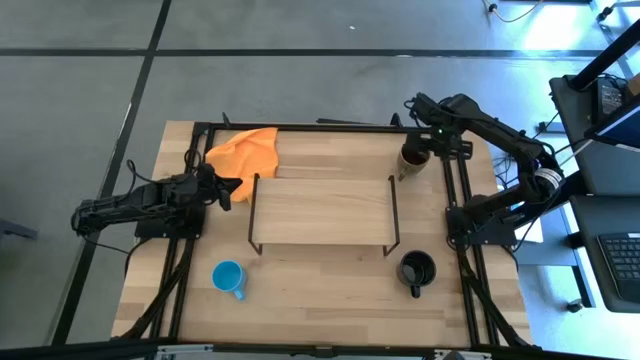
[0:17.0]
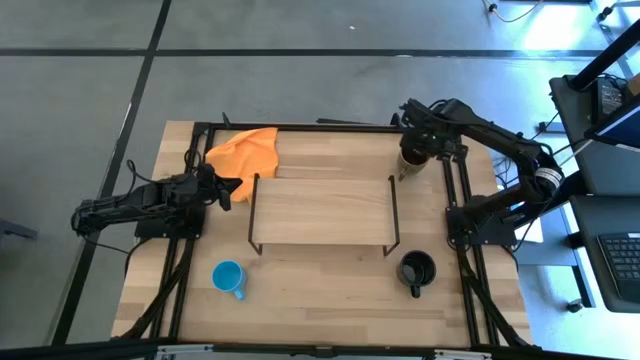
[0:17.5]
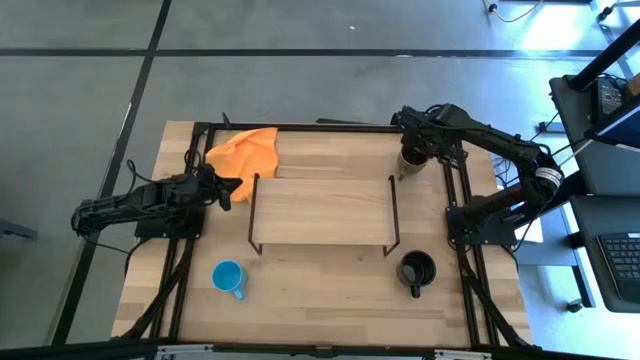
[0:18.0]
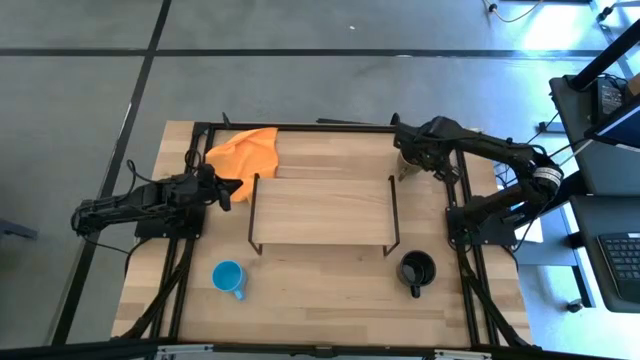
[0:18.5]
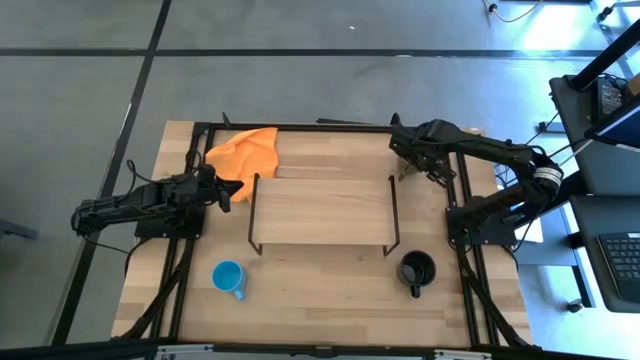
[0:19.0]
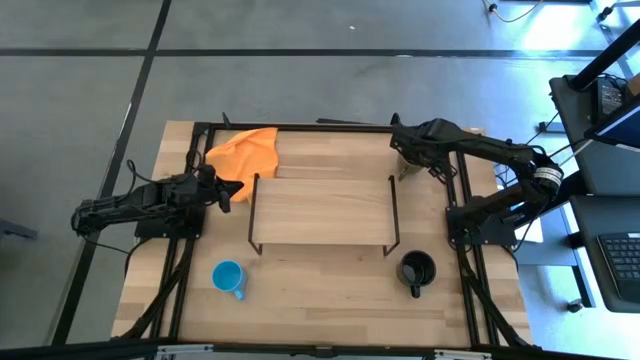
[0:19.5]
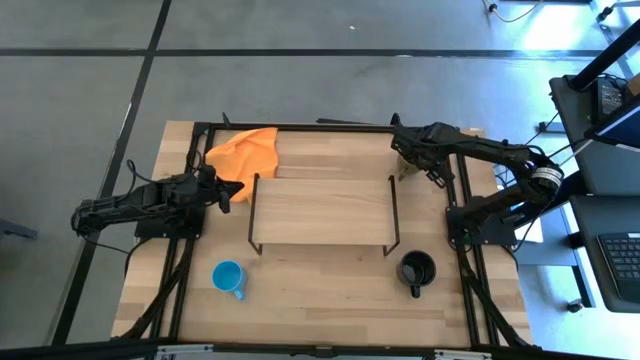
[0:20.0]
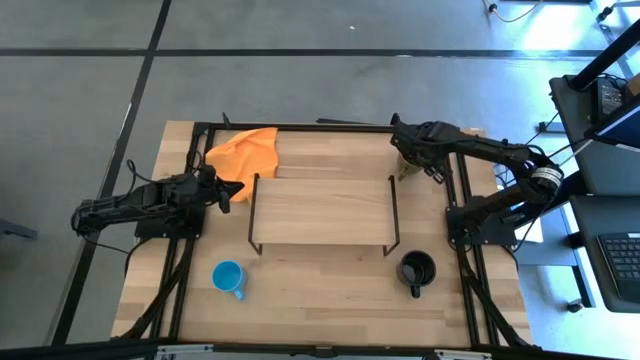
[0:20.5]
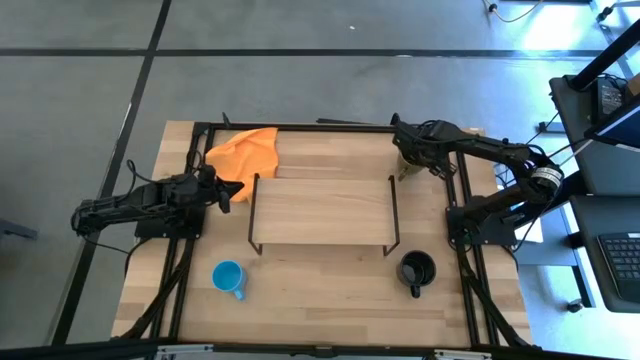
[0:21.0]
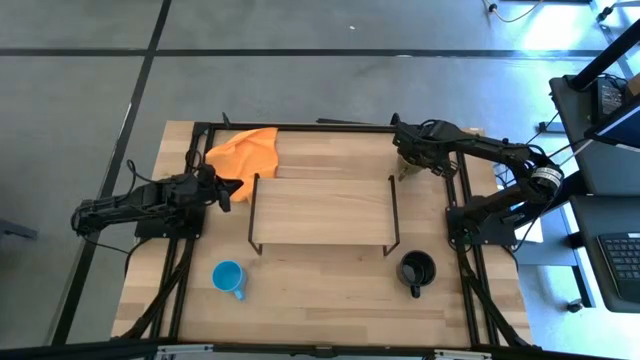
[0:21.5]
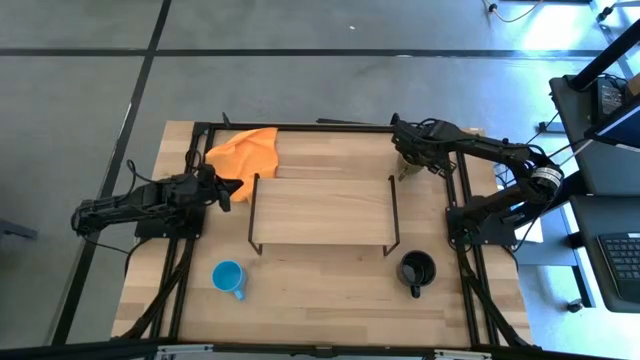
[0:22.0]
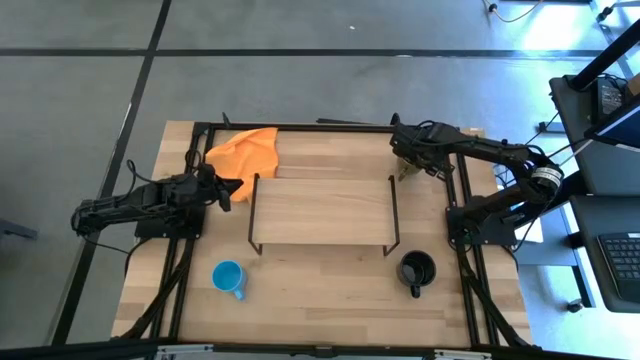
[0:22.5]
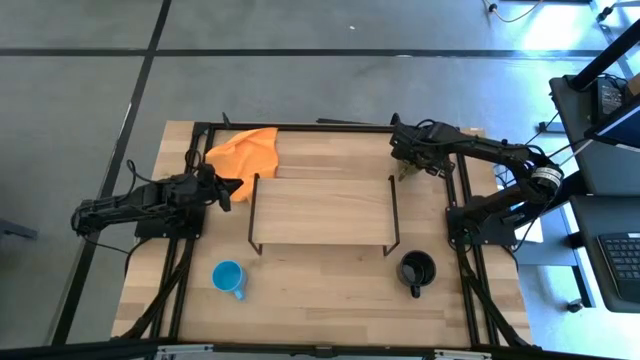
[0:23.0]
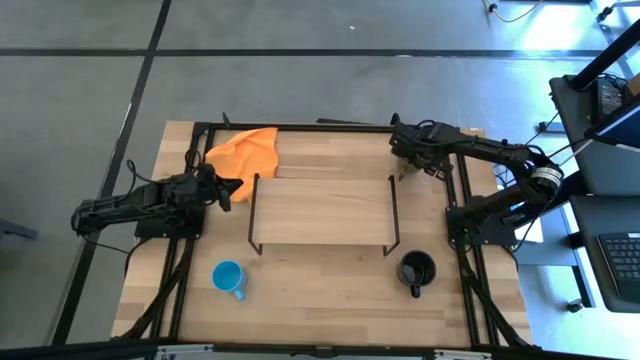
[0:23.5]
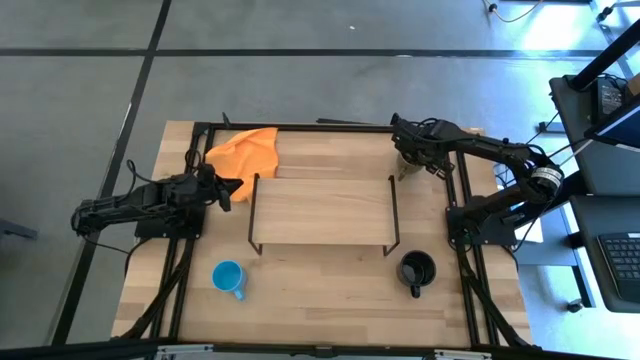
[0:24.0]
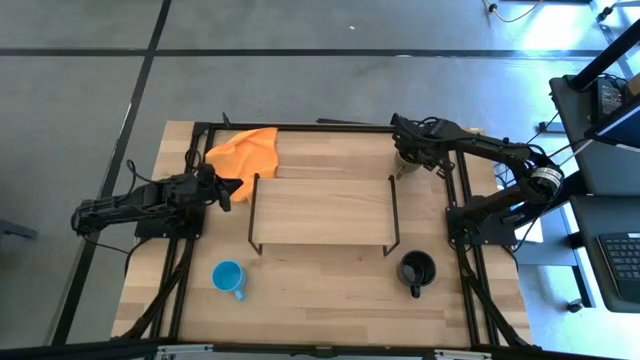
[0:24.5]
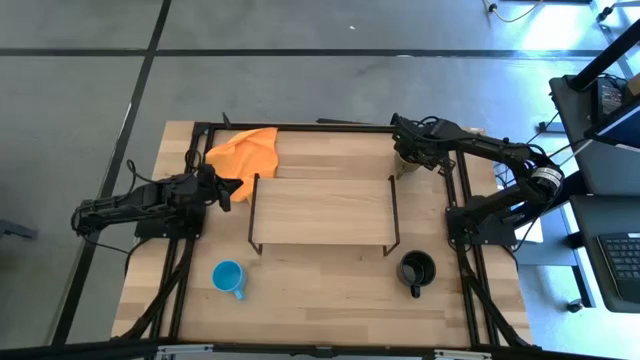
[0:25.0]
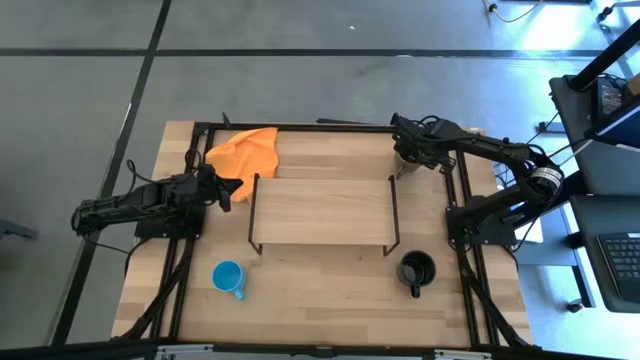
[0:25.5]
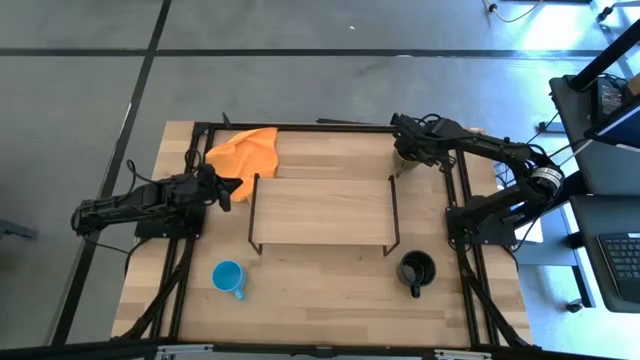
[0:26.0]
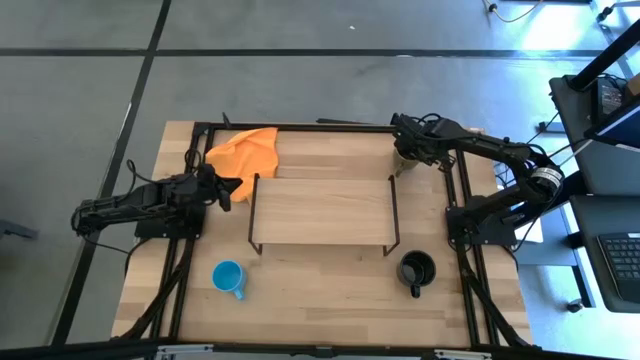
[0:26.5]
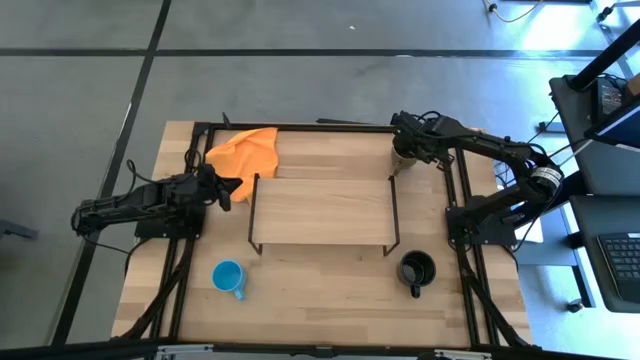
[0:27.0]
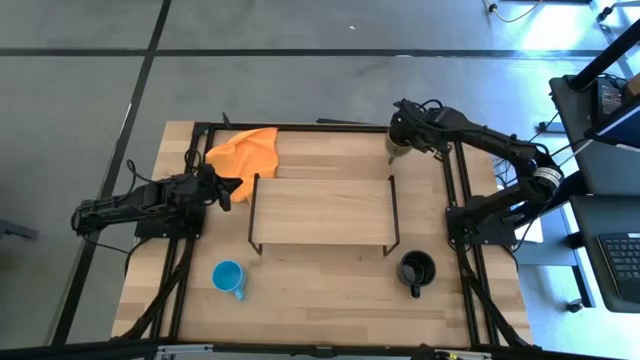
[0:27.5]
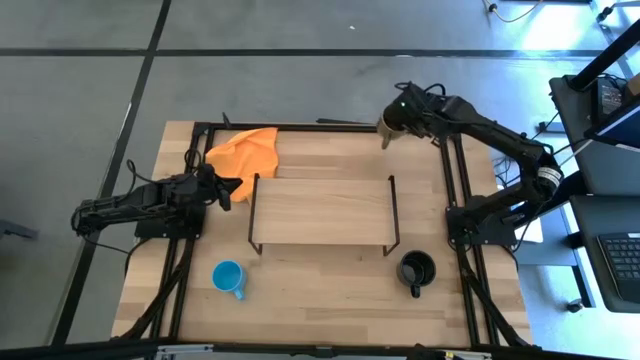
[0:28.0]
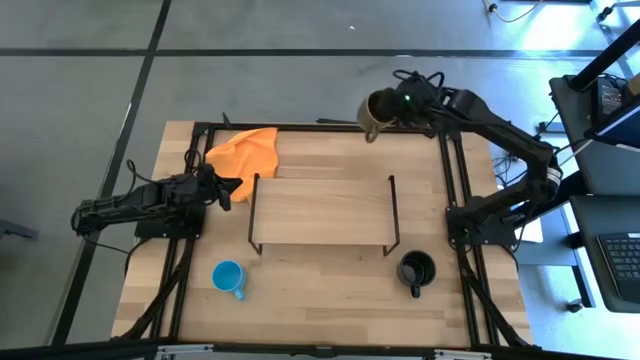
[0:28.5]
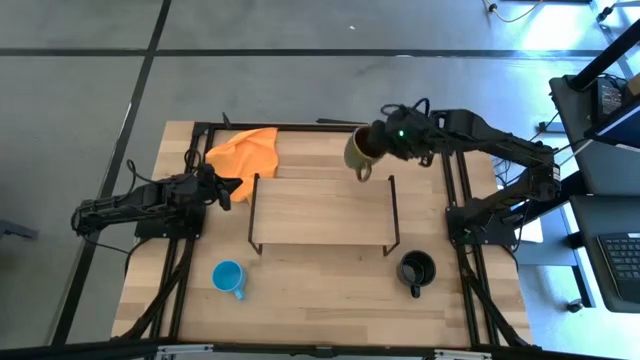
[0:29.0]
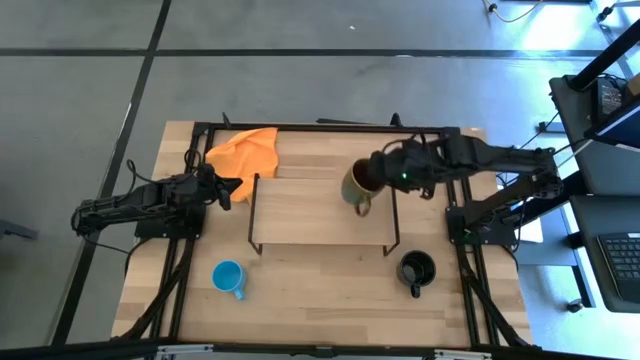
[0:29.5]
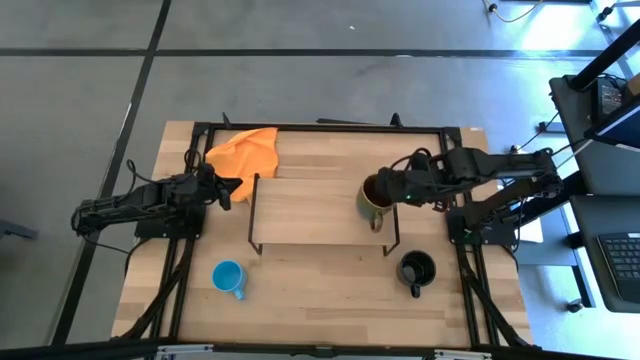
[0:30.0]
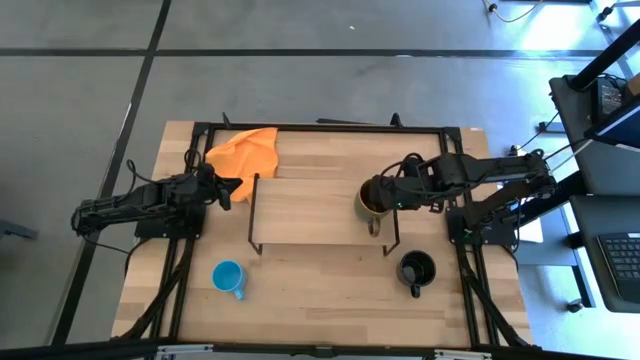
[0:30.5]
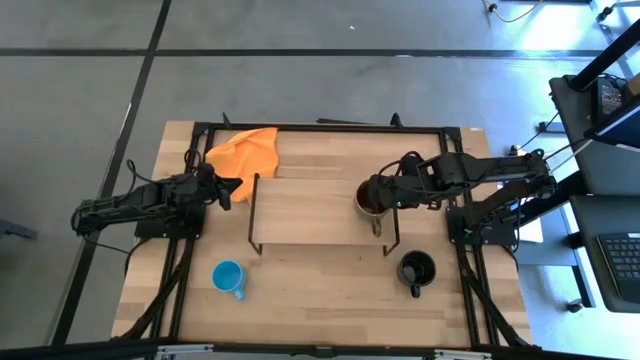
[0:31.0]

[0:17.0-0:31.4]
Task: Stack small to large cups/mugs on shelf
Put the brown mug on the shelf

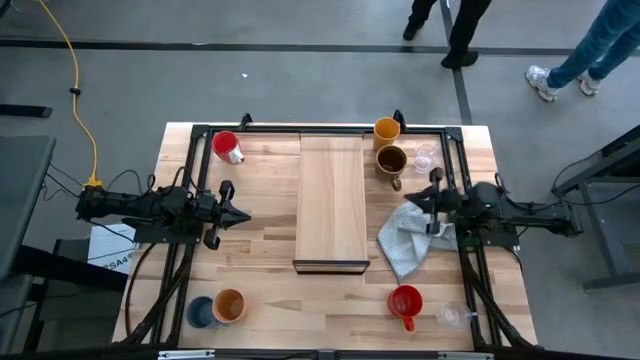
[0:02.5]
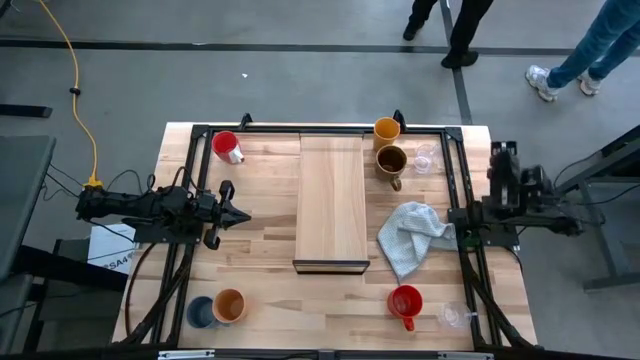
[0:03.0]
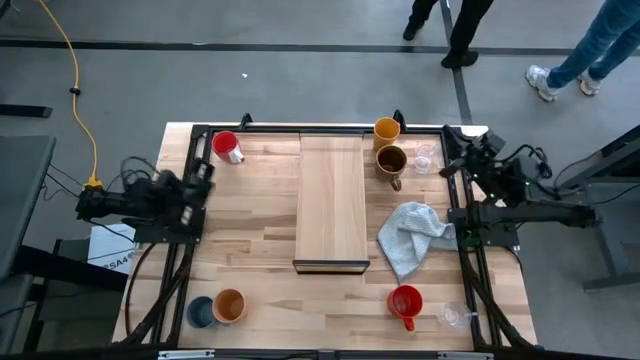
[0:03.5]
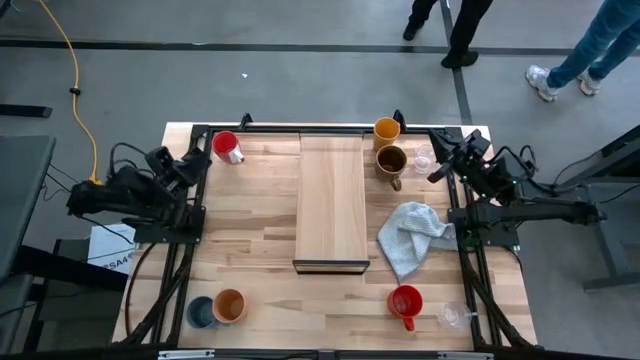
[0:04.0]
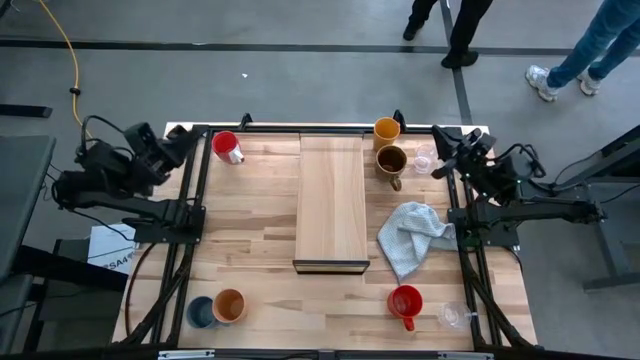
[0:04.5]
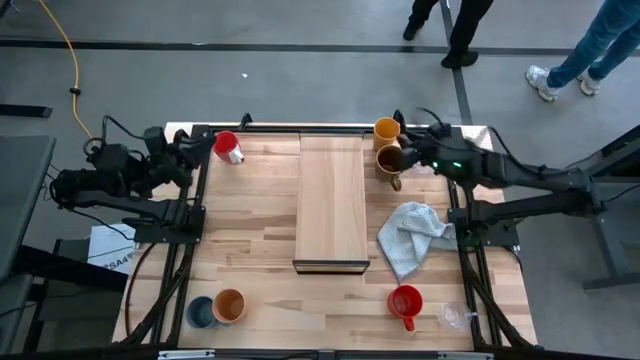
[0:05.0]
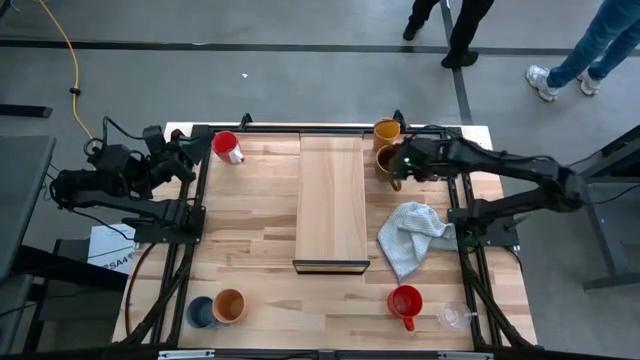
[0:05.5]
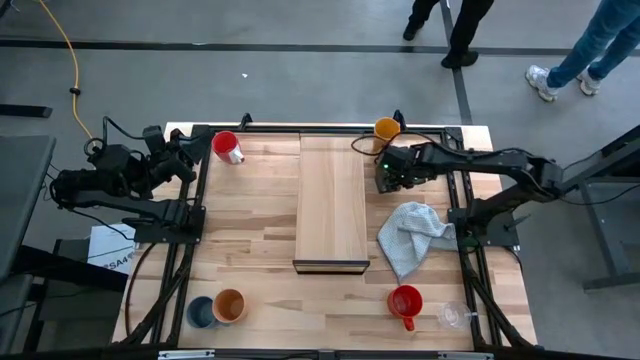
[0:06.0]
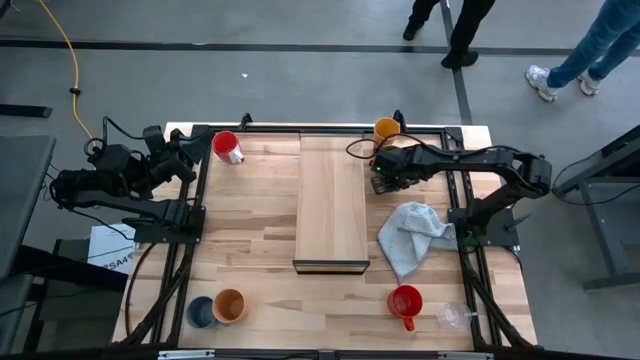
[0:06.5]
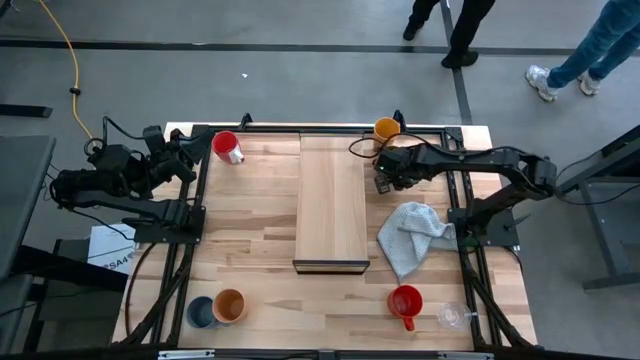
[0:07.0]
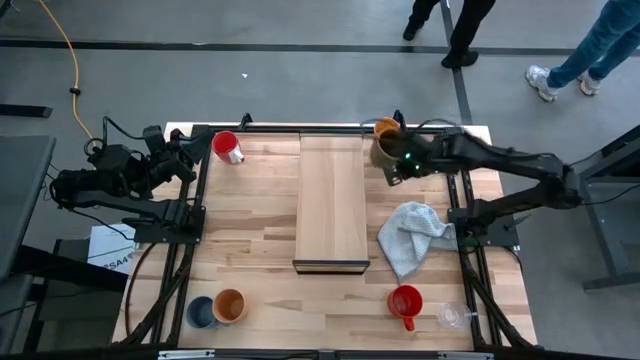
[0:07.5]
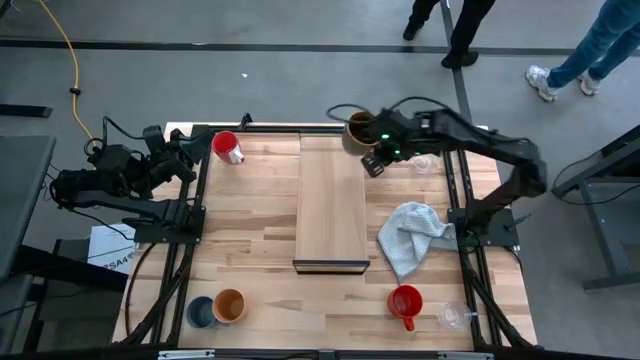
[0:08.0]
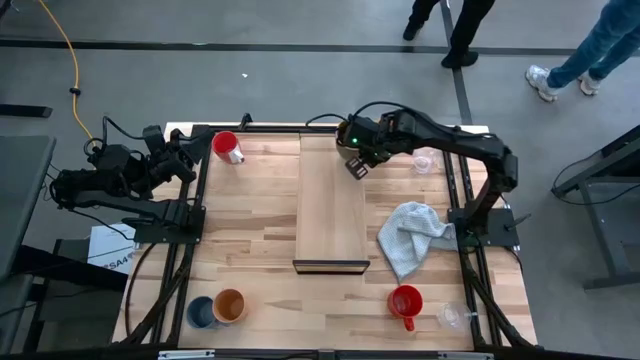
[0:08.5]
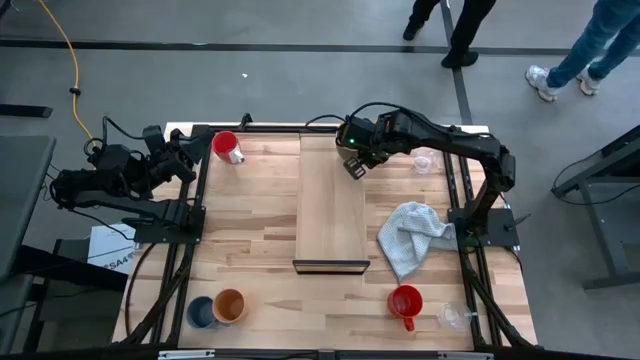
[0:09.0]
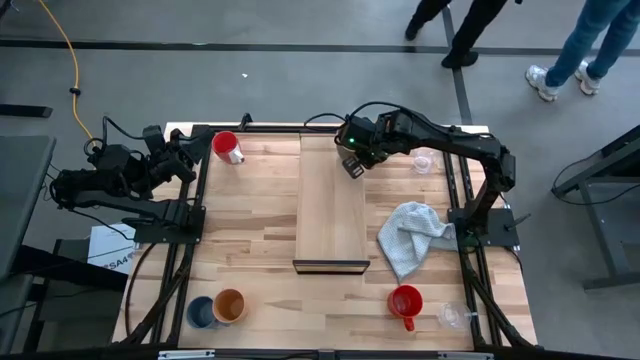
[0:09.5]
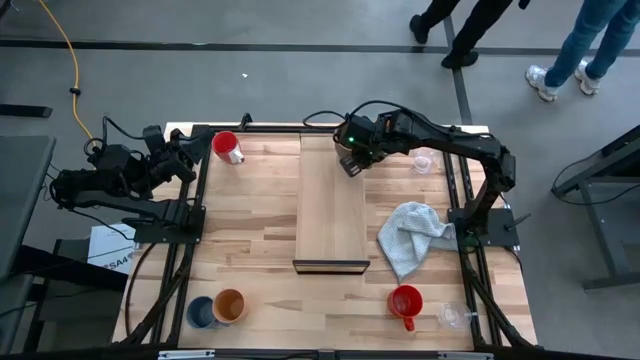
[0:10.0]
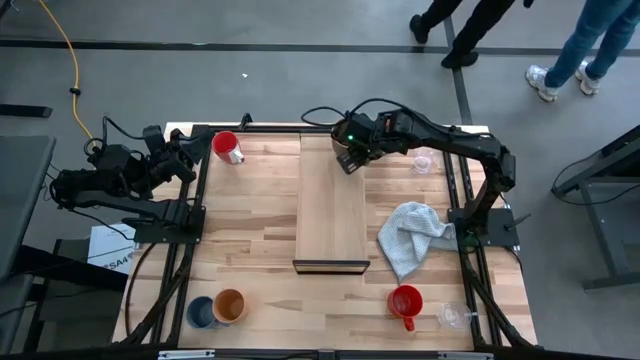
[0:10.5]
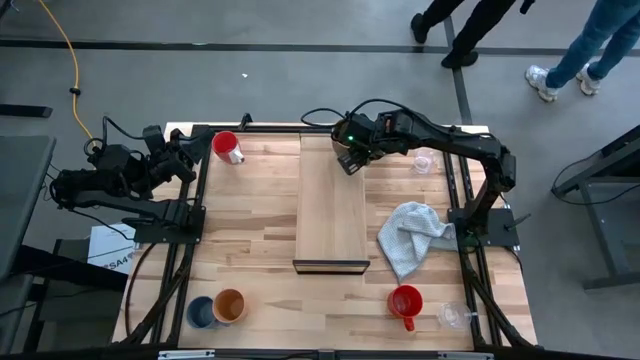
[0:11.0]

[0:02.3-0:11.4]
Task: Stack small to large cups/mugs on shelf
Put the green mug on the shelf
